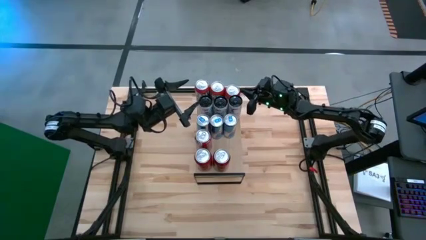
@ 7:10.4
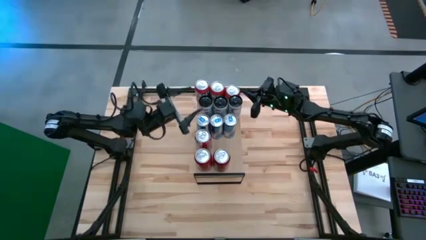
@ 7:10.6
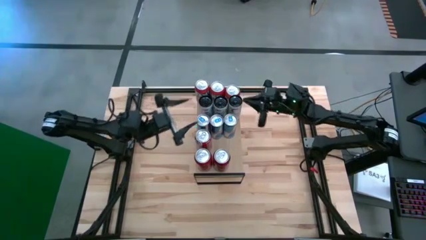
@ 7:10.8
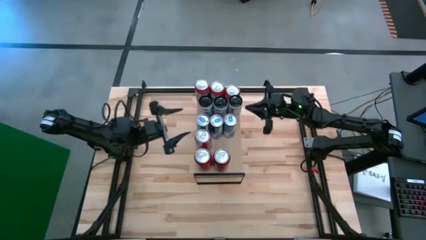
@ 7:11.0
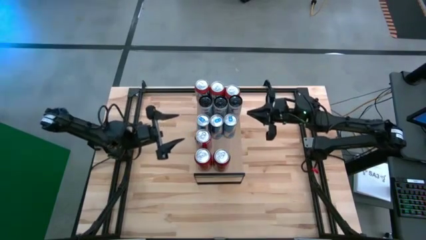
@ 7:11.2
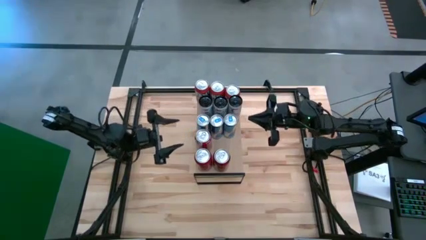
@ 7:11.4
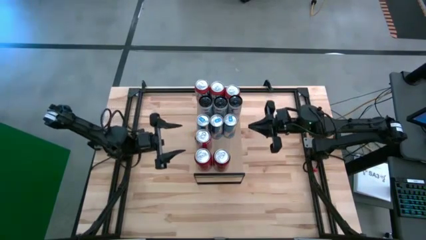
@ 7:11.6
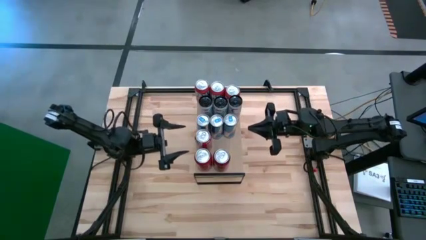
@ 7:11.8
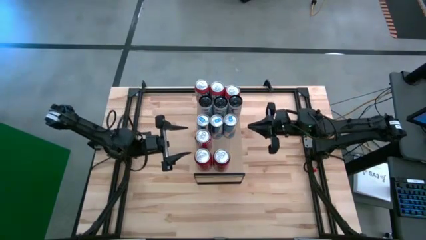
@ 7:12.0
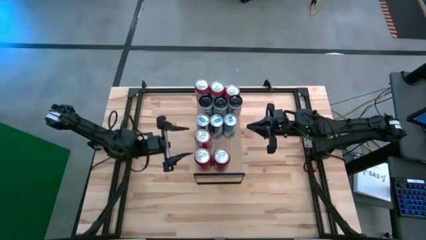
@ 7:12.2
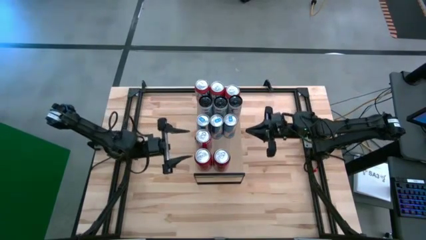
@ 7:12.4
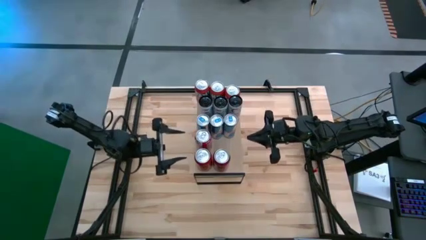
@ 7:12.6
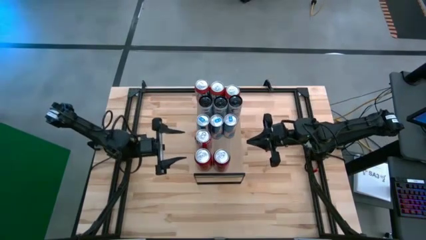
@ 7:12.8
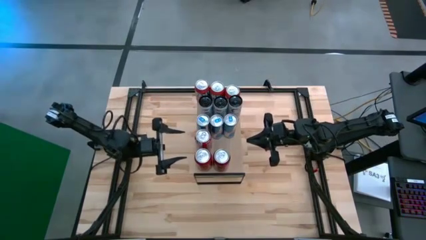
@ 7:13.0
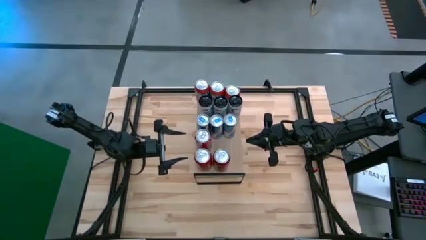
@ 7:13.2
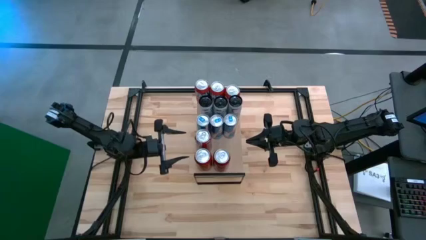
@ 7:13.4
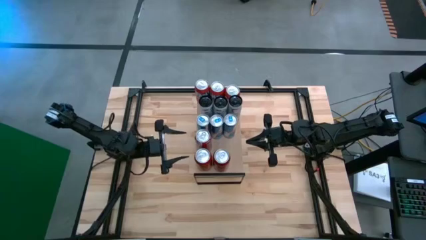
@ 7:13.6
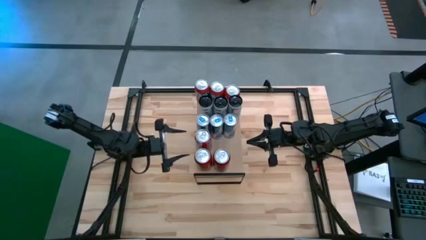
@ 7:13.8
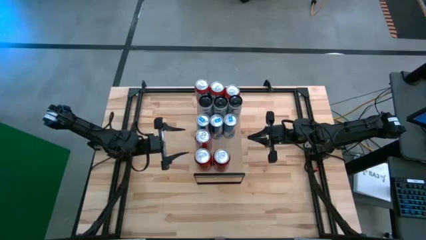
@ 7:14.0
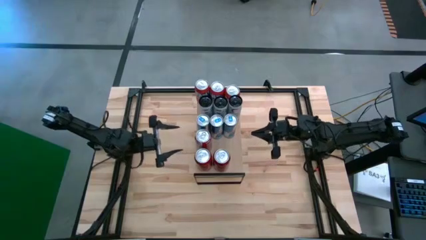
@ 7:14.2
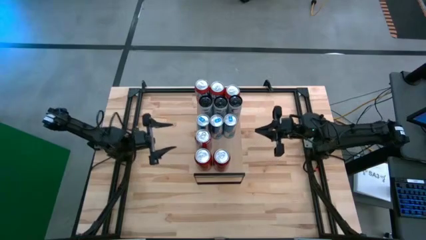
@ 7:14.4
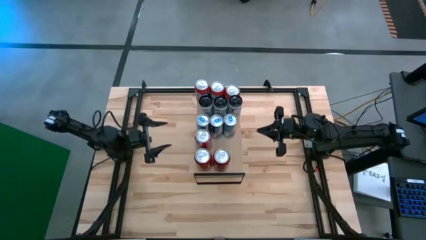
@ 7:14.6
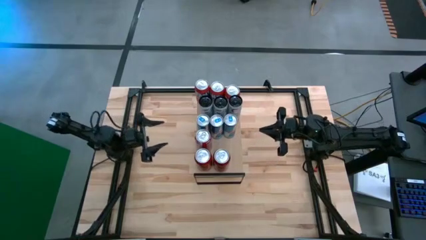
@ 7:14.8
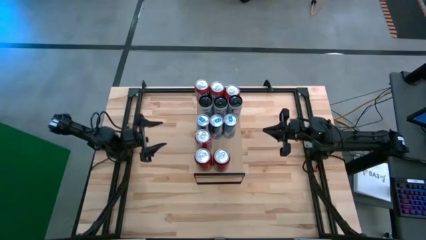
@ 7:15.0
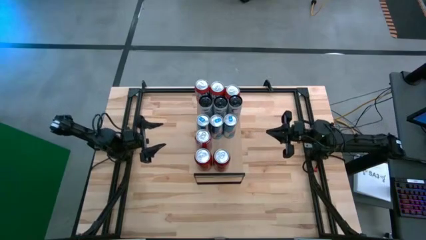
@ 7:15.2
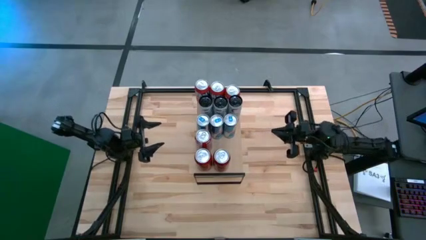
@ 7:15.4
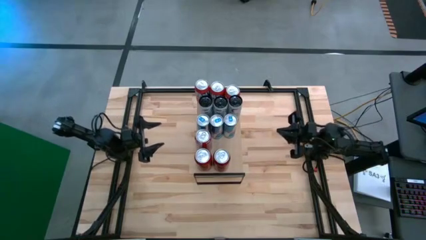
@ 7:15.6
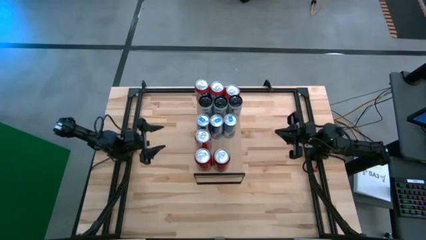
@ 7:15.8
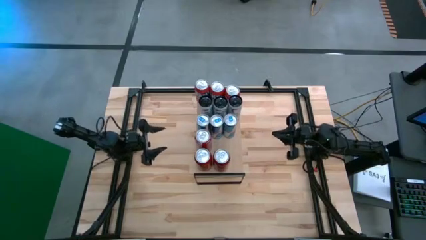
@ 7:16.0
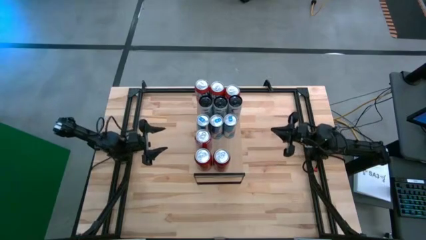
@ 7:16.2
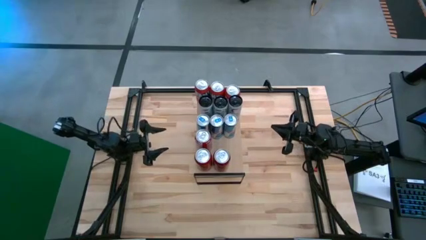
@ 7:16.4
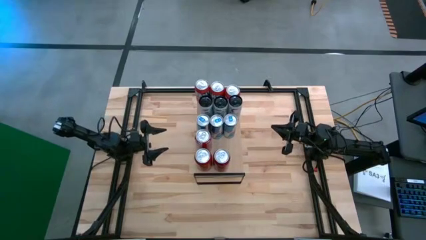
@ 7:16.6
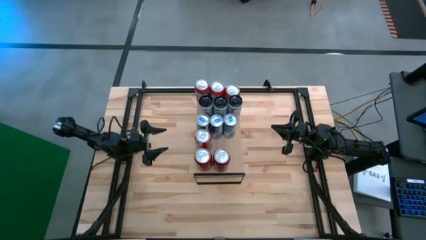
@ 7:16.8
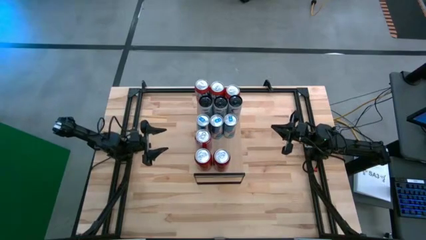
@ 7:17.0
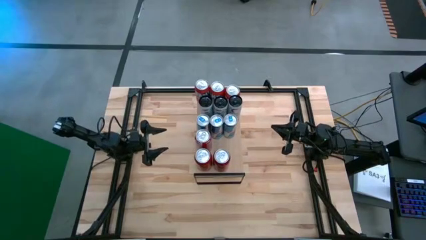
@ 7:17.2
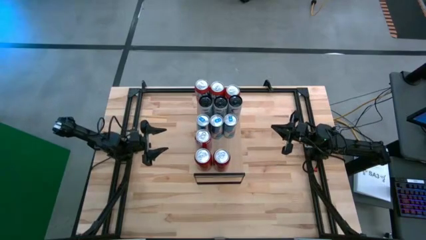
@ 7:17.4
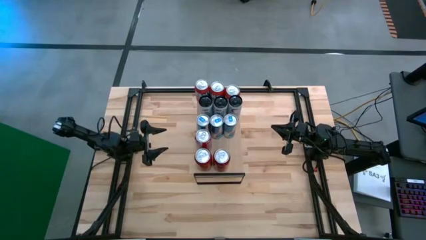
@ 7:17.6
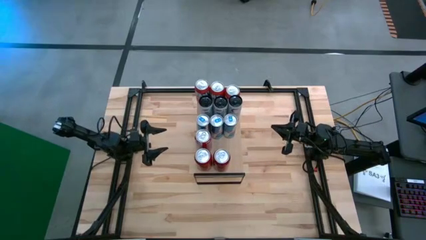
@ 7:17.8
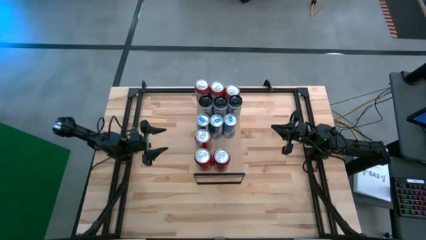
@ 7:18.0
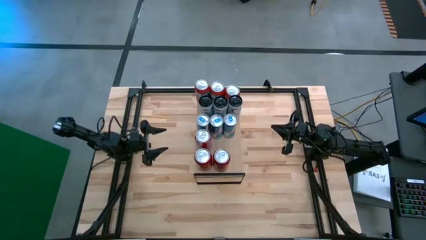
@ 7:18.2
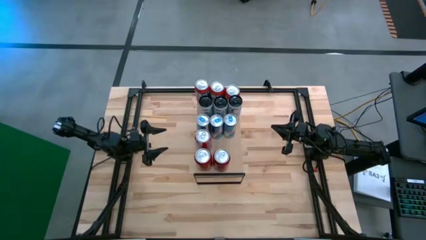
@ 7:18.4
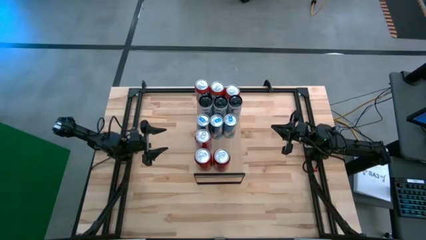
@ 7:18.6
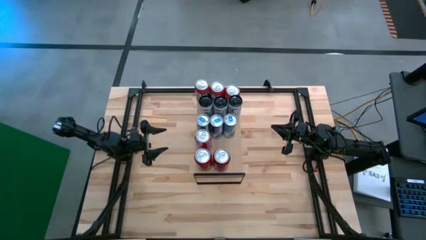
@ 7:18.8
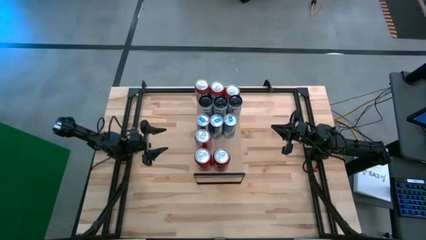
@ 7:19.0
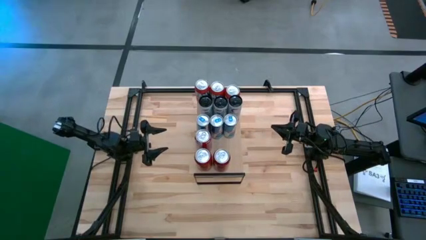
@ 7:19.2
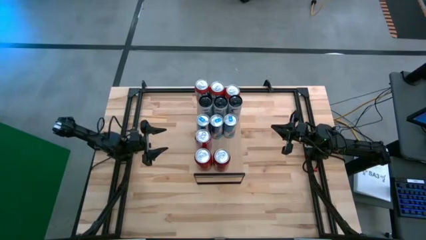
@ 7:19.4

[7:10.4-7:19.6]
Task: Place canned beverage on shelf
Return to Home Position

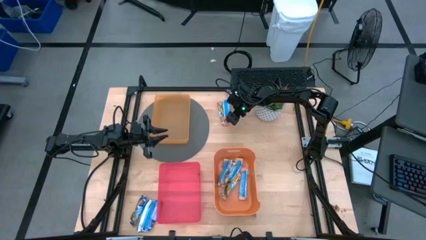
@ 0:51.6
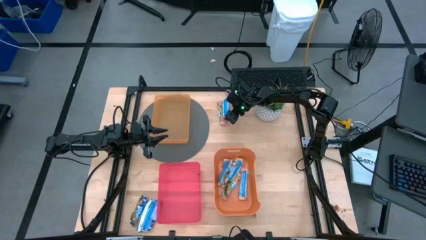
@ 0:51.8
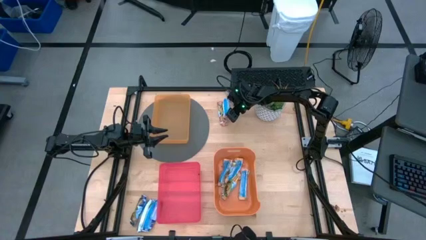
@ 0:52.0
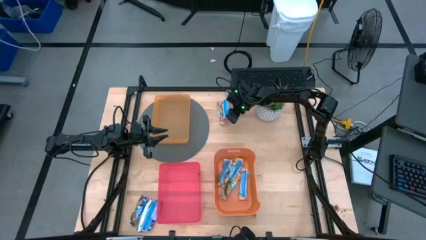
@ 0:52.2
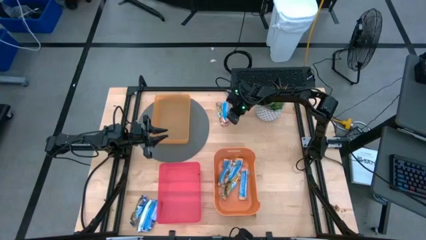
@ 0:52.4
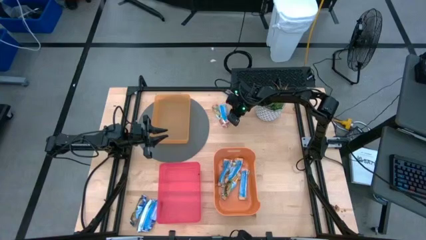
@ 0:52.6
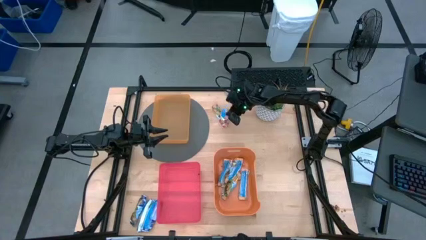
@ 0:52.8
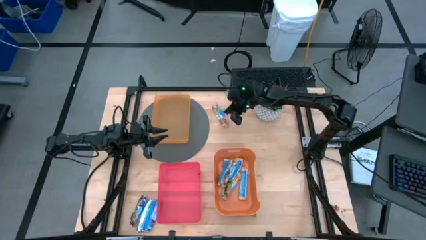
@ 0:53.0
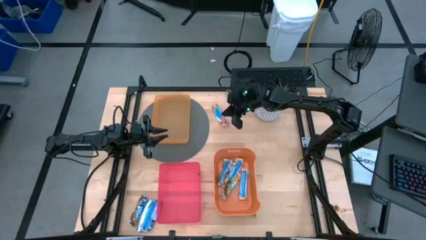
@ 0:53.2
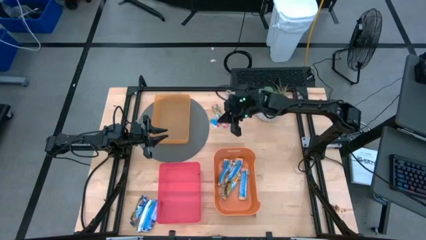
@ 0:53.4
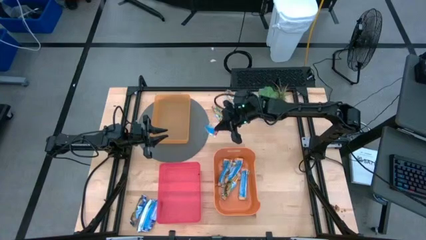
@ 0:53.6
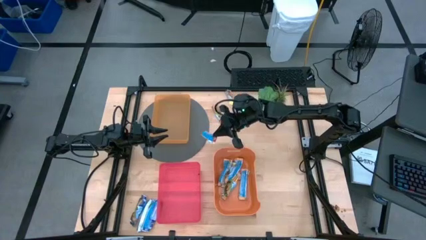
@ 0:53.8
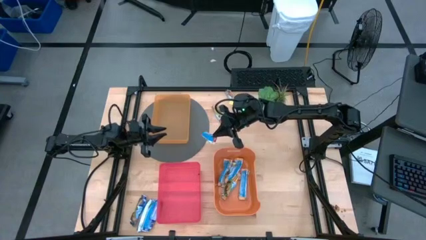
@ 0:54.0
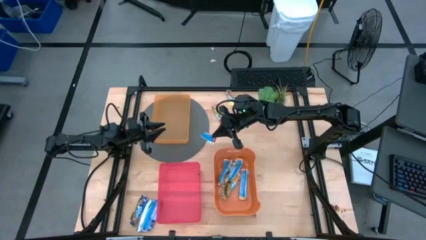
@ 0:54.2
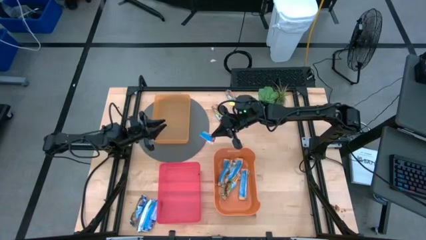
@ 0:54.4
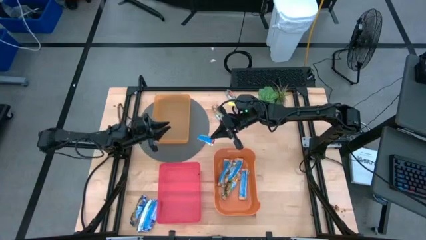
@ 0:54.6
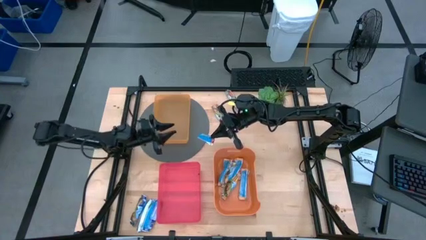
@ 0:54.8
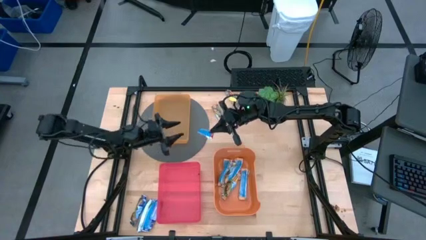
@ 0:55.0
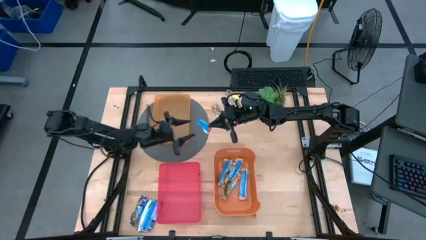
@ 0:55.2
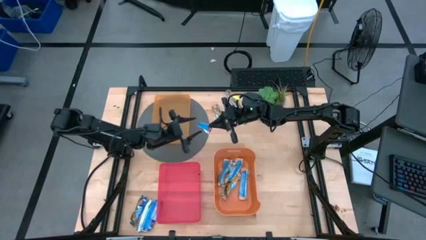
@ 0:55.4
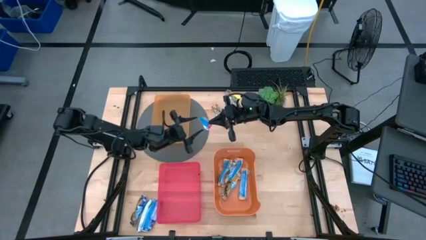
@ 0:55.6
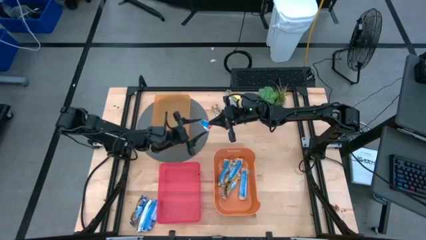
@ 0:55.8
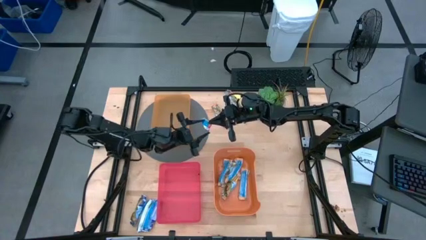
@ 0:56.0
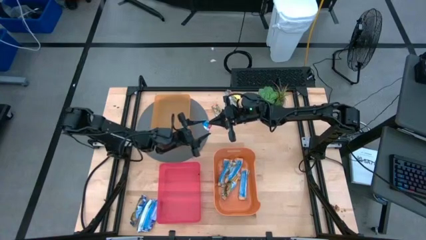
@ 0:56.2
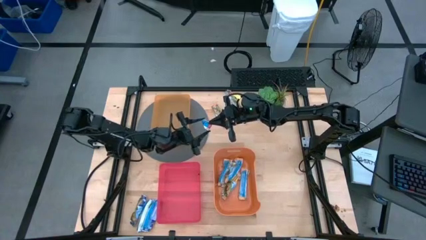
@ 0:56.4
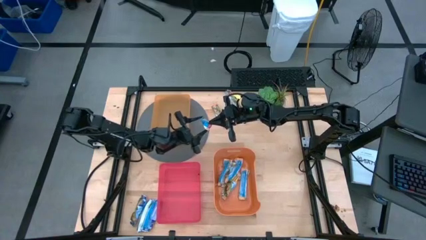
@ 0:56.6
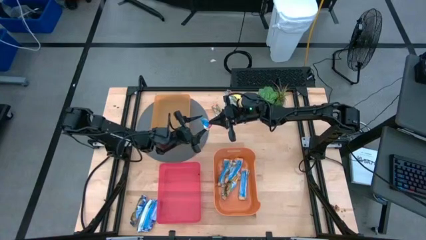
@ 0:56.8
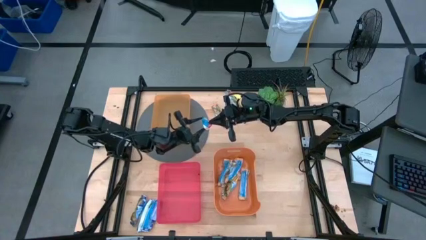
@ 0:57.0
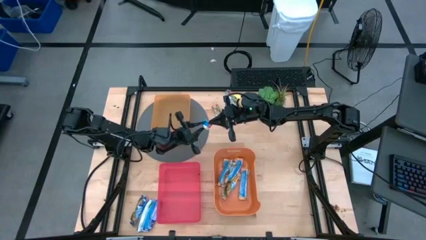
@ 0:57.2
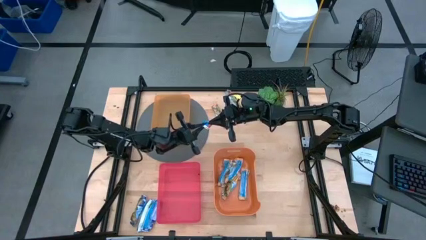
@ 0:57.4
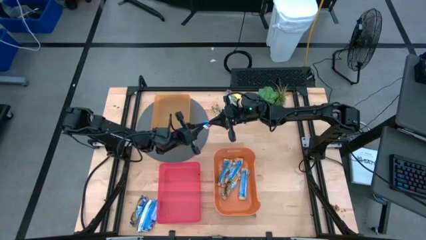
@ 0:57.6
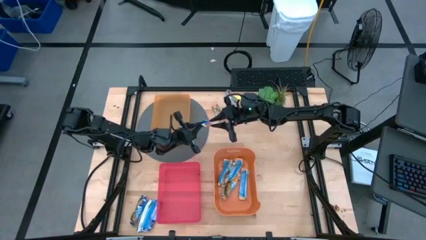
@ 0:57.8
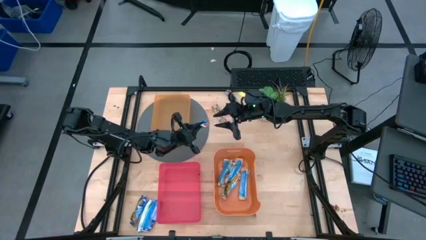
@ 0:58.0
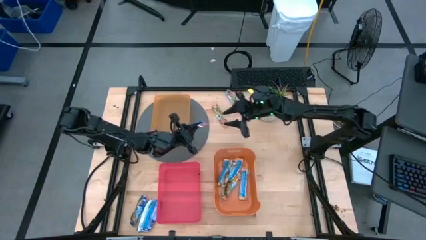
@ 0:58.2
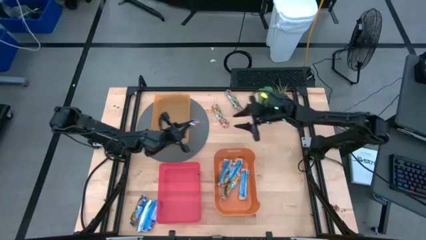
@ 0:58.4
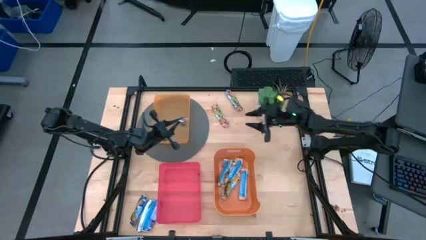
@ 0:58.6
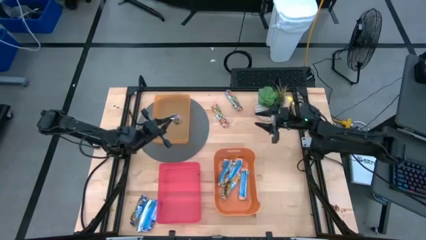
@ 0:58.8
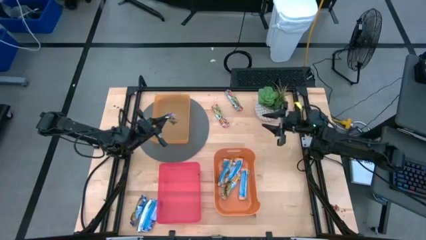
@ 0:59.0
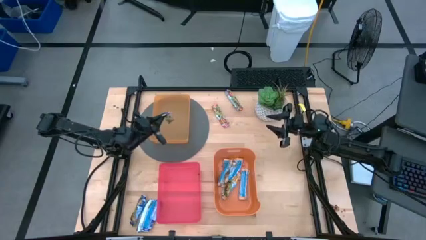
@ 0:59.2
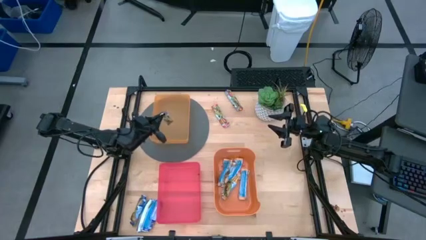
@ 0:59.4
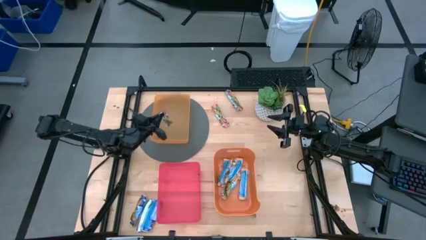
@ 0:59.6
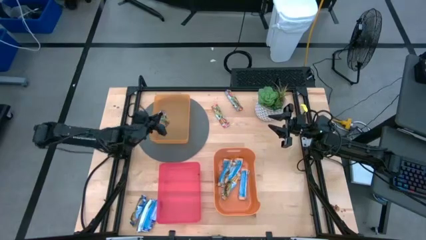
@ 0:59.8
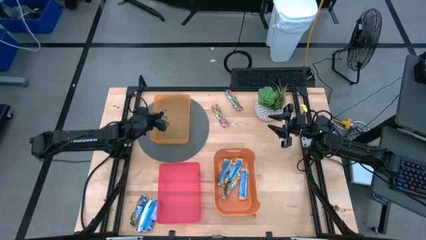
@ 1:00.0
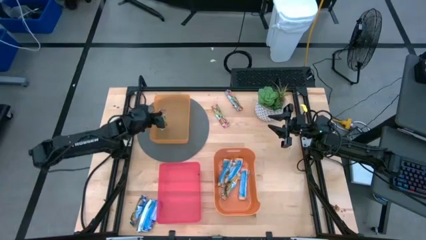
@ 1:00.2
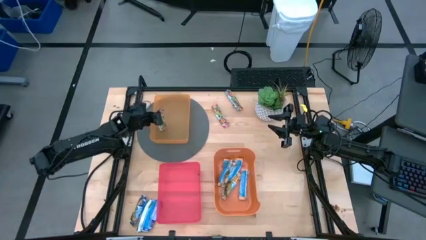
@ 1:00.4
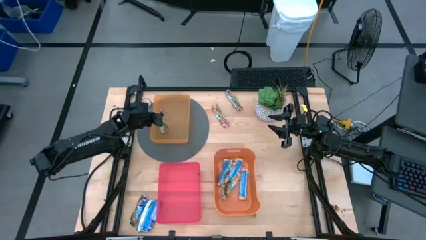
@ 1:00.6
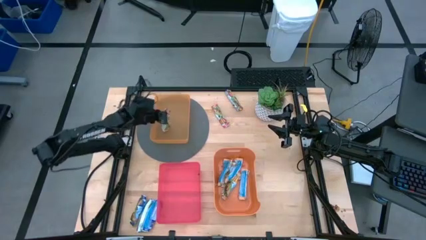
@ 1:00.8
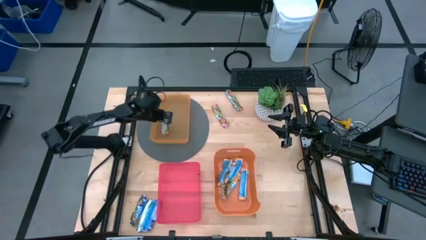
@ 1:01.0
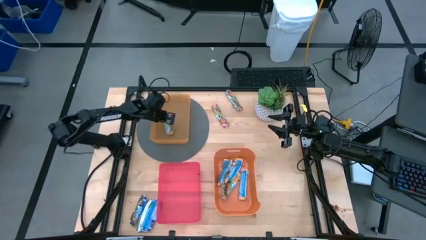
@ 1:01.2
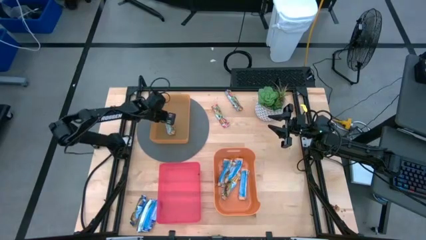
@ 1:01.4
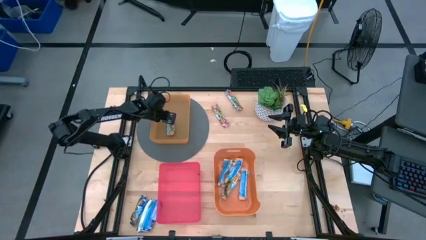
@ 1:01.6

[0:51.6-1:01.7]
Task: Pick and place Granola Bars by type
Put the red granola bar into the light orange bin
